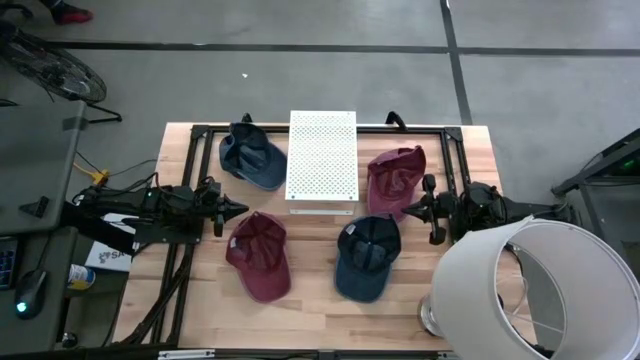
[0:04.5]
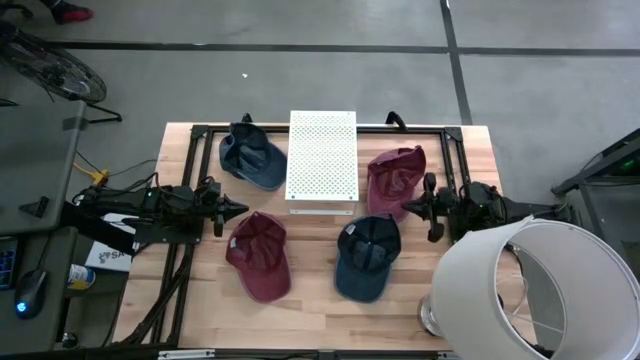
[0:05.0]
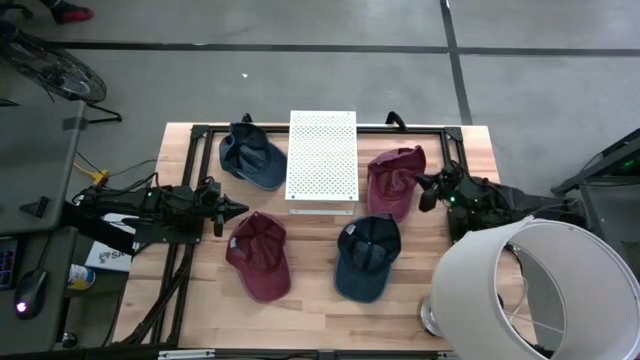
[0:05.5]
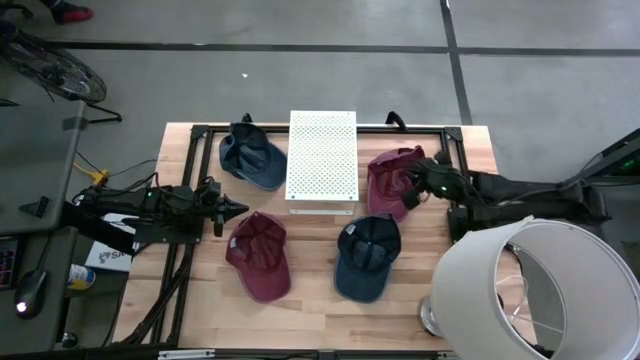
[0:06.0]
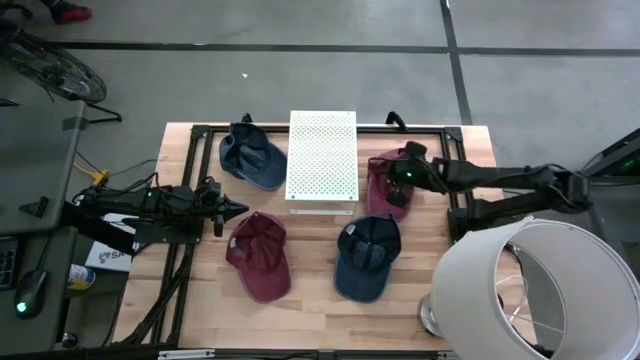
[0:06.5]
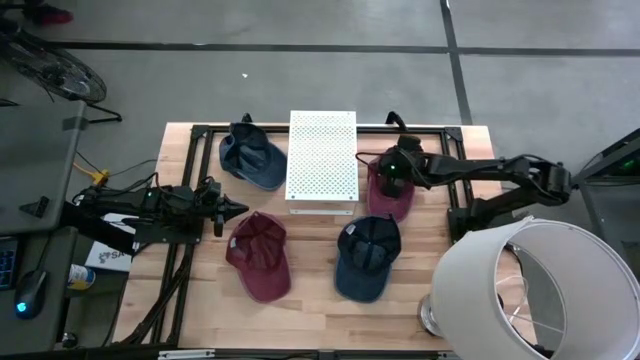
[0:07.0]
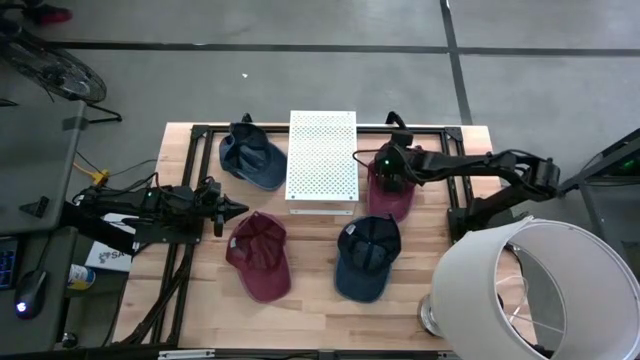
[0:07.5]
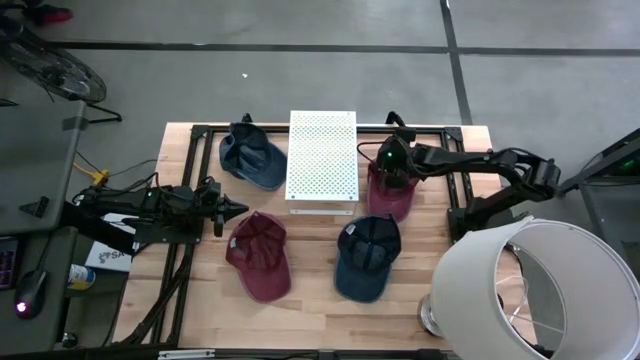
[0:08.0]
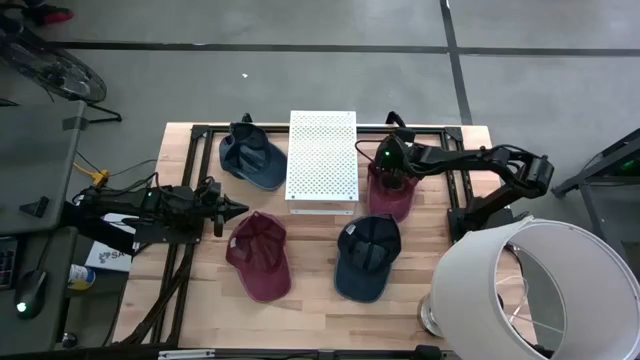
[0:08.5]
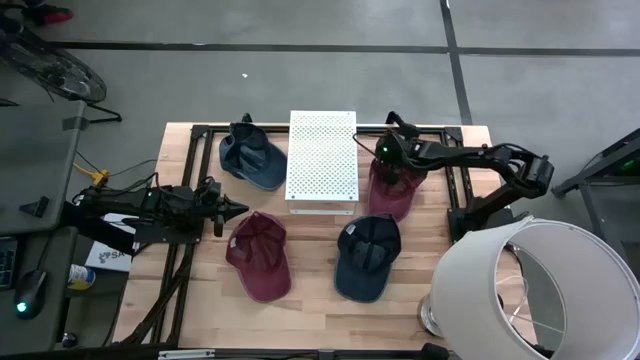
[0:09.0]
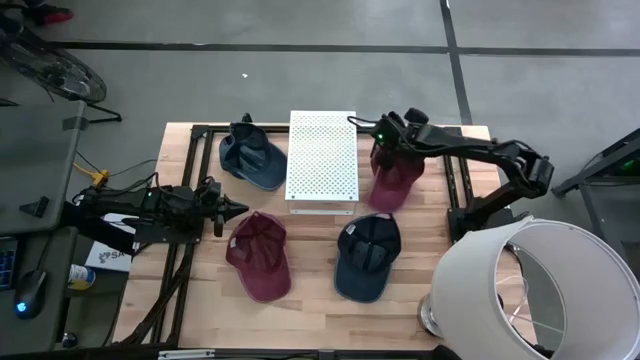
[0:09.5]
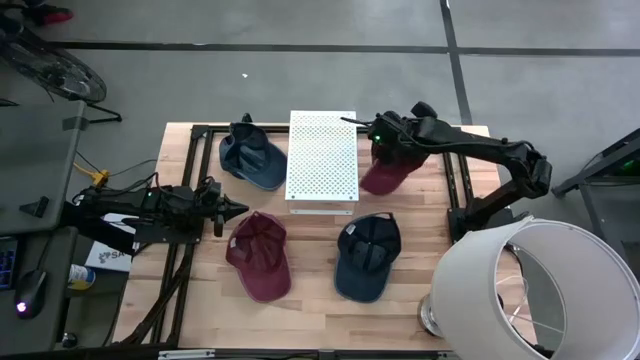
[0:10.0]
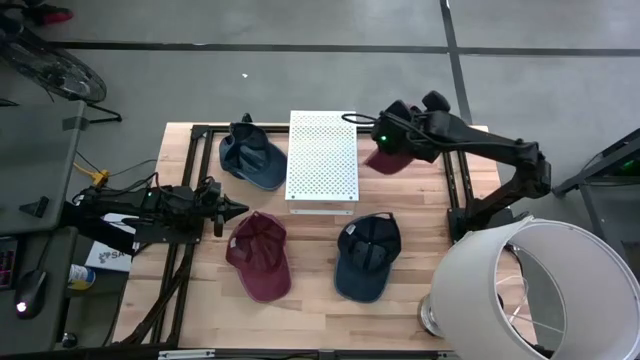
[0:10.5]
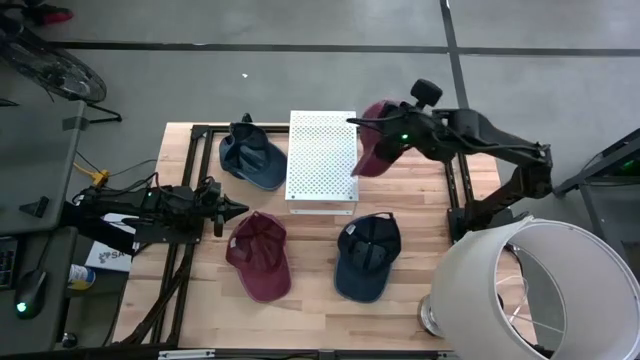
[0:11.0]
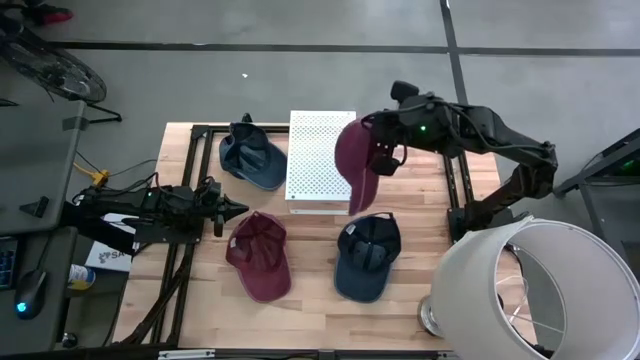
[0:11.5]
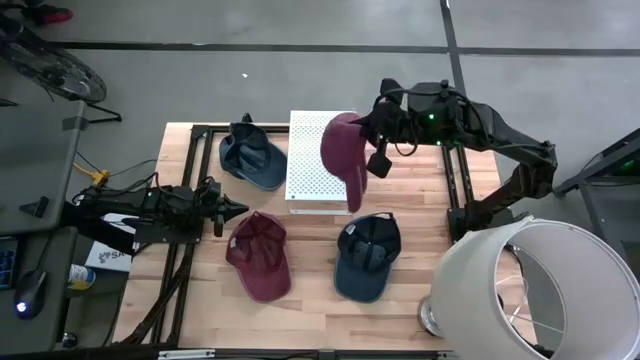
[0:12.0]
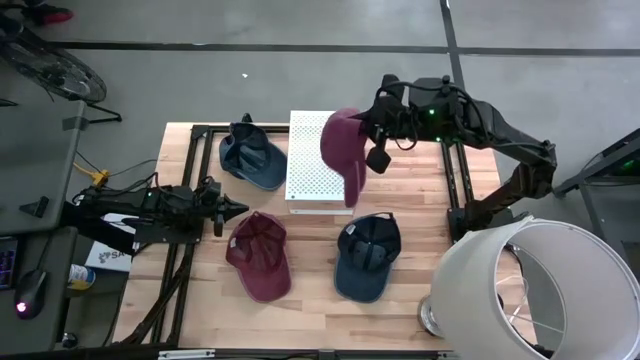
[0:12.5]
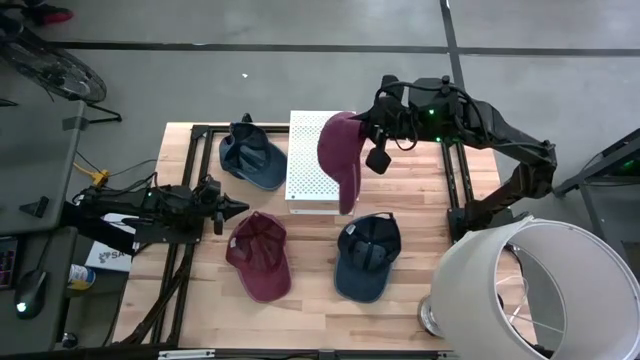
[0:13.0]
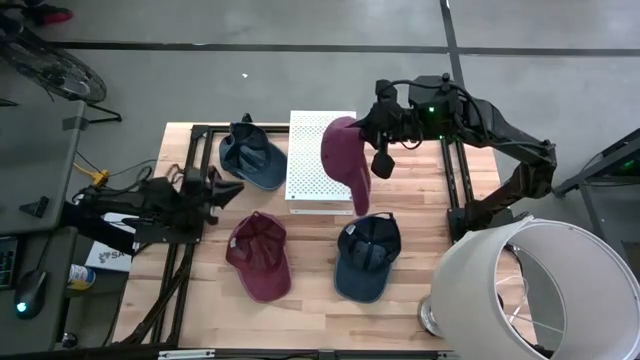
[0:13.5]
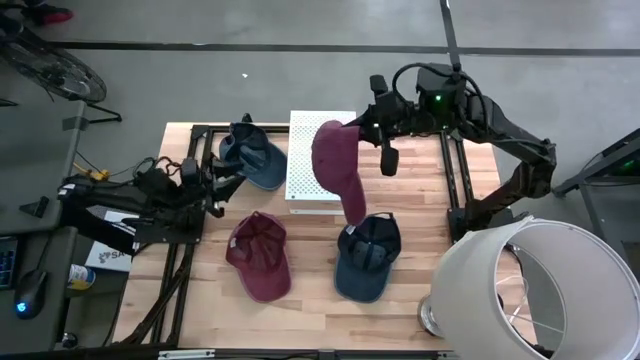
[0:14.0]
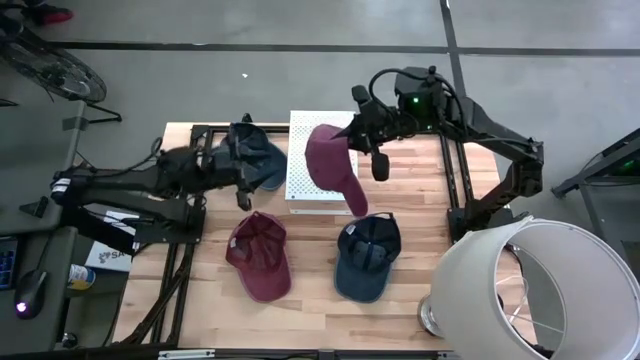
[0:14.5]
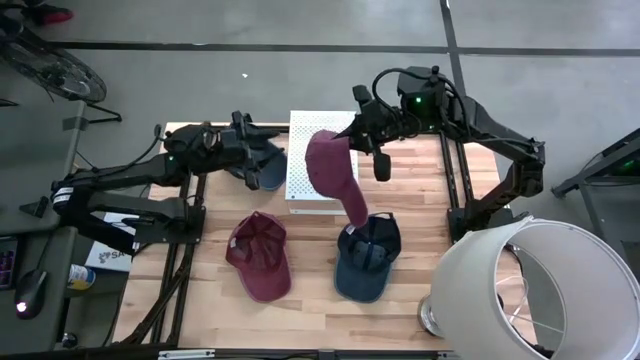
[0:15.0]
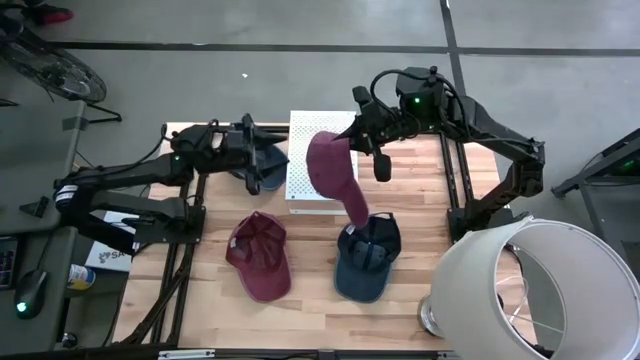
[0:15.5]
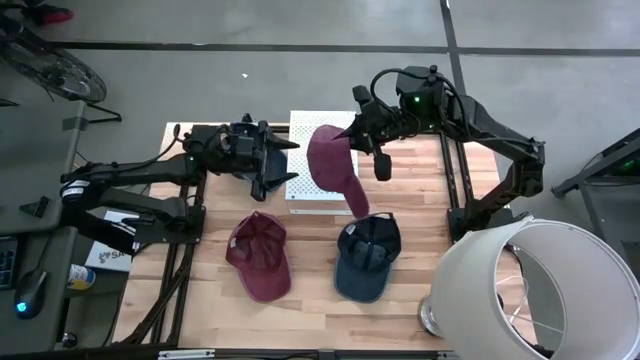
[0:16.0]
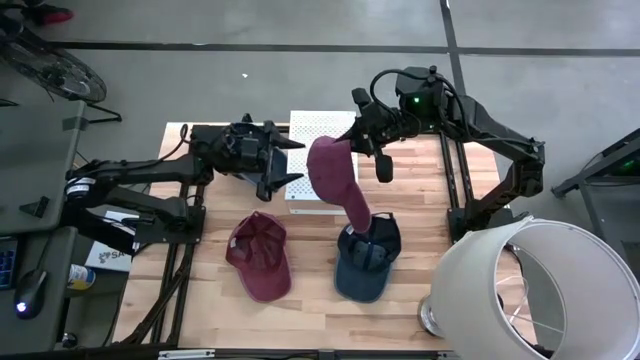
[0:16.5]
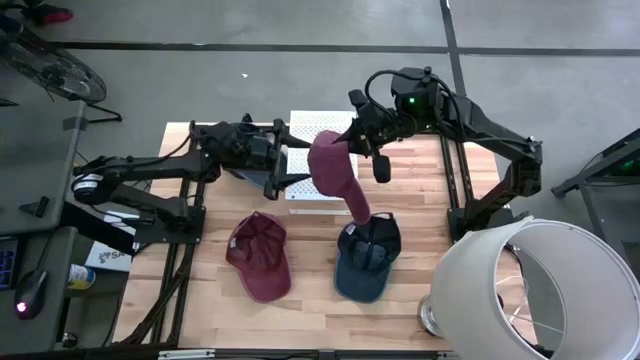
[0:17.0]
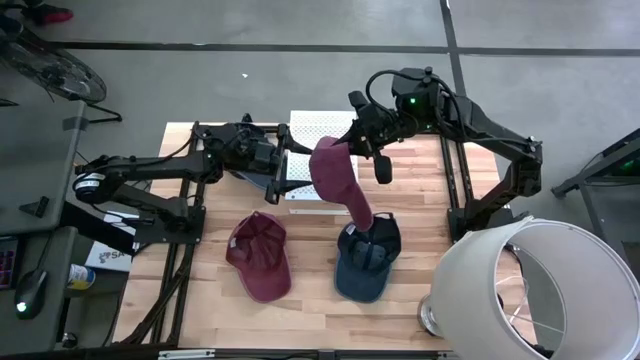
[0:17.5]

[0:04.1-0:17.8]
Task: Pick & Place hat
Put the top red cap on the shelf
